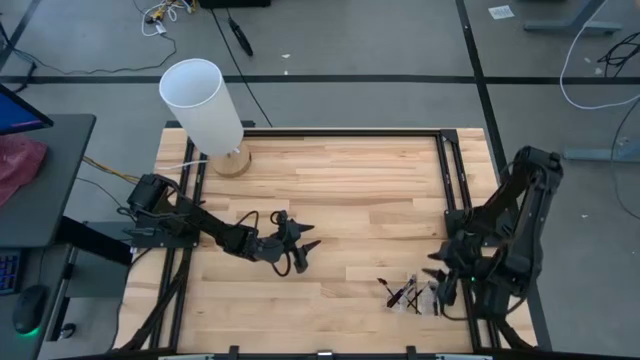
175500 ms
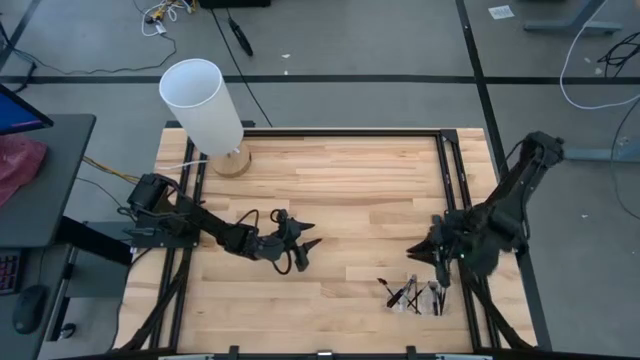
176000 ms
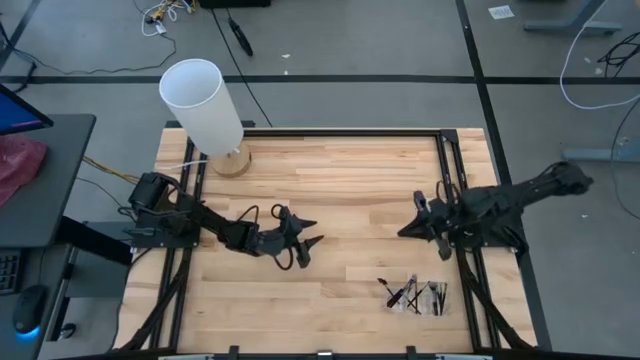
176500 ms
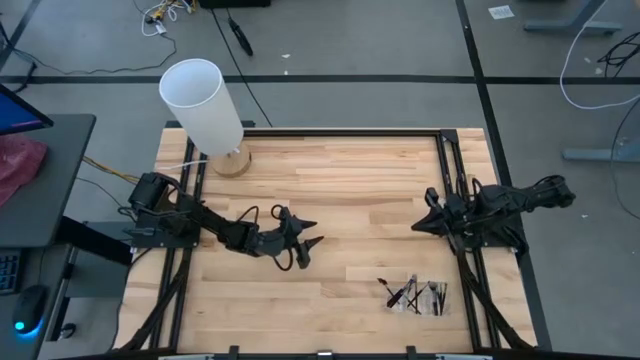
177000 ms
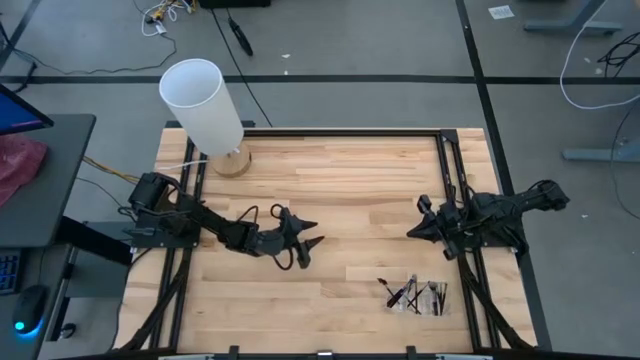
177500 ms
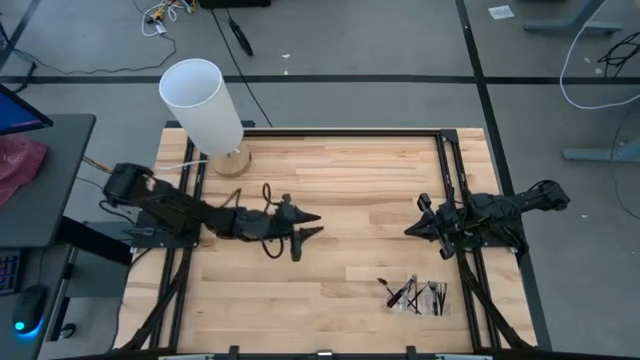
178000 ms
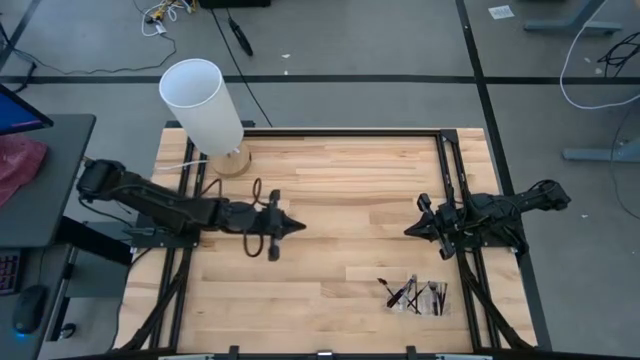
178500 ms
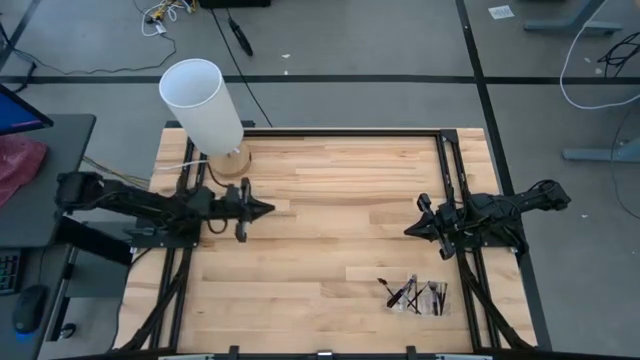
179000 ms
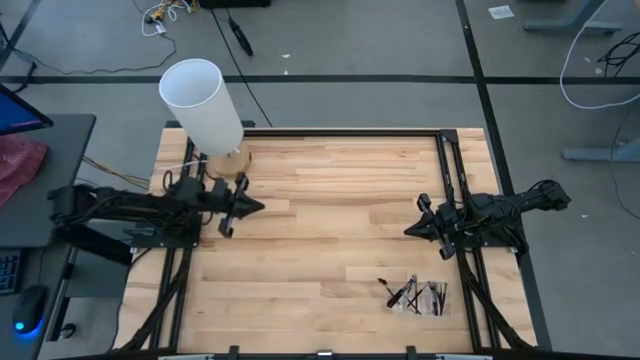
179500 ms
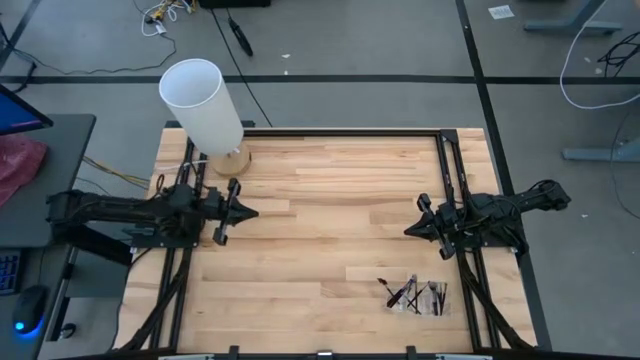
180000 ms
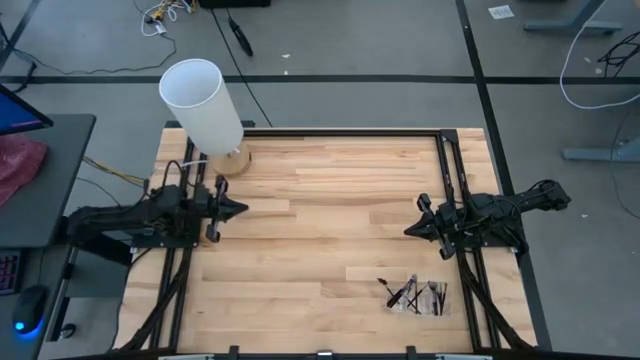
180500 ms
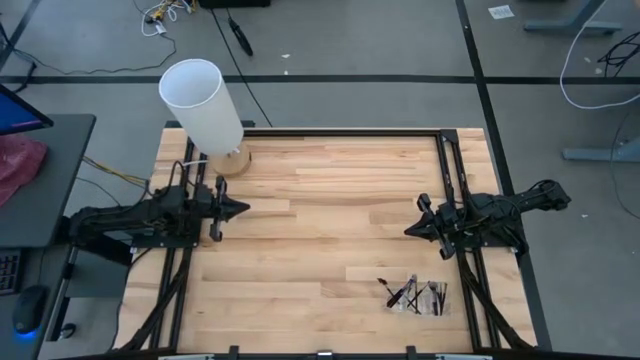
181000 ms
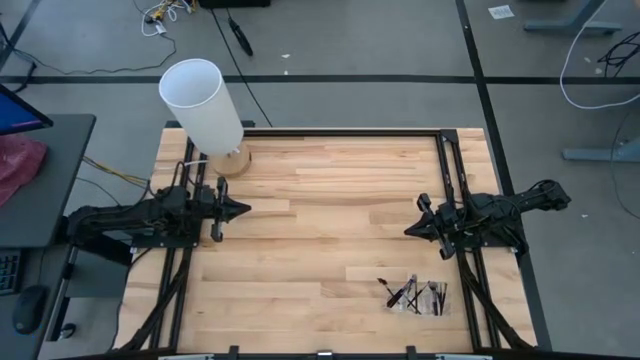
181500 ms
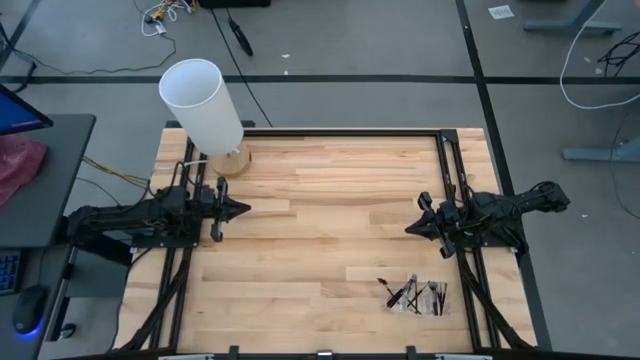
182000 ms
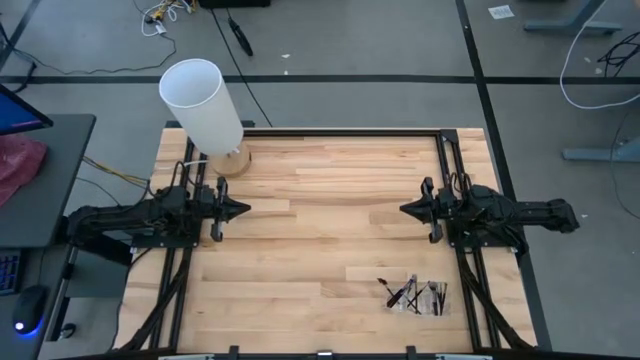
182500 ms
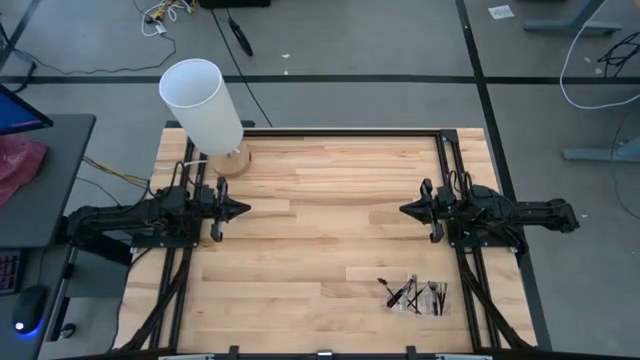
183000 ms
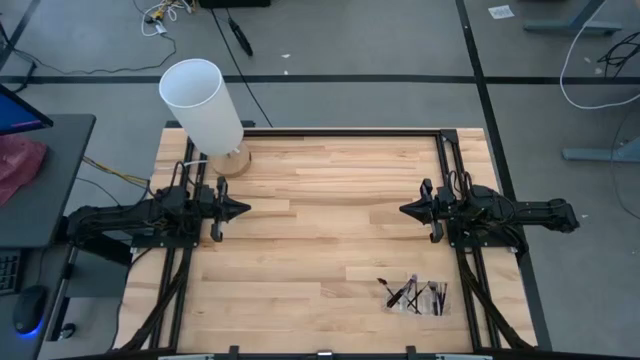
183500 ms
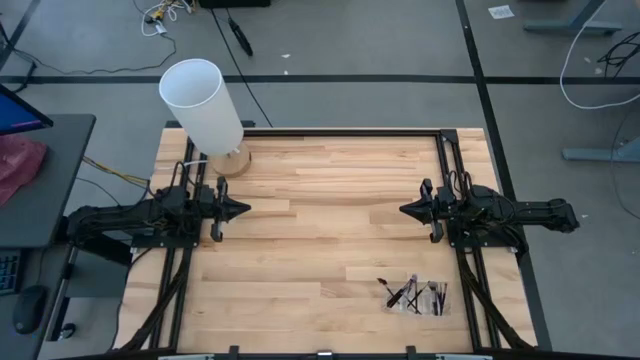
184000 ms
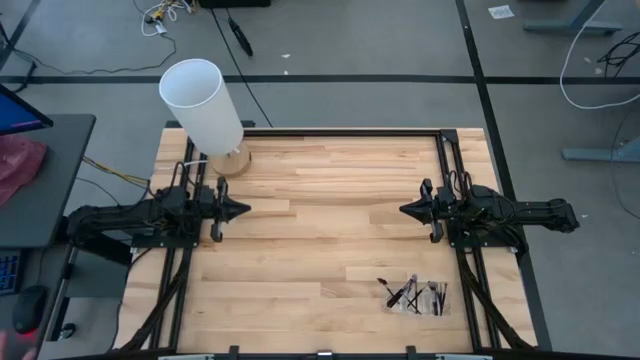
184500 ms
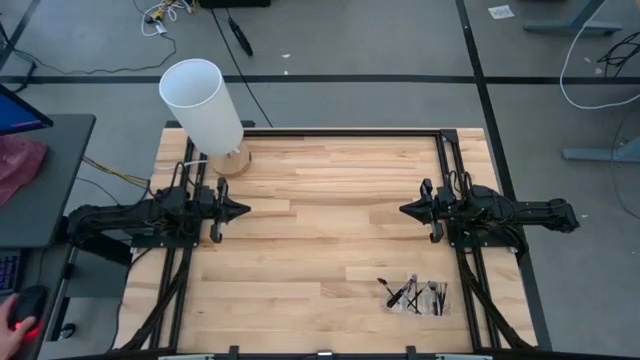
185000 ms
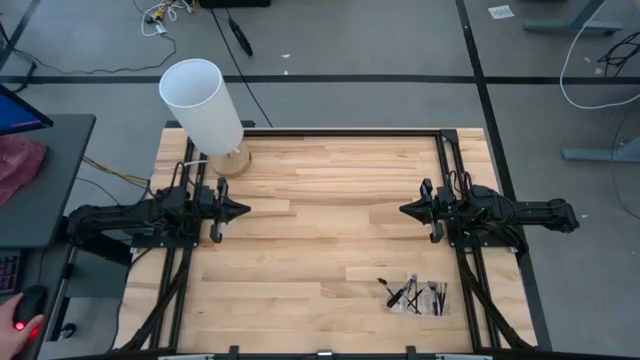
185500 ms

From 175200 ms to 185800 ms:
Task: Pick & Place Makeup Supplies
Return to Home Position

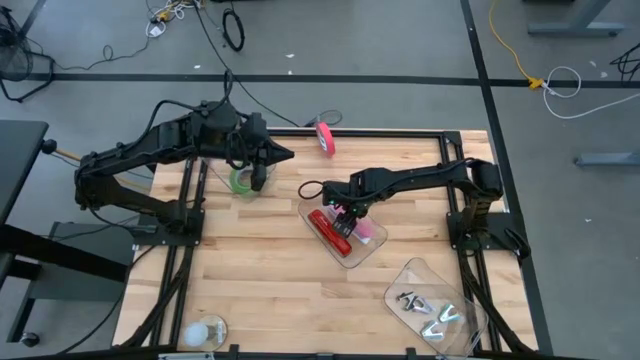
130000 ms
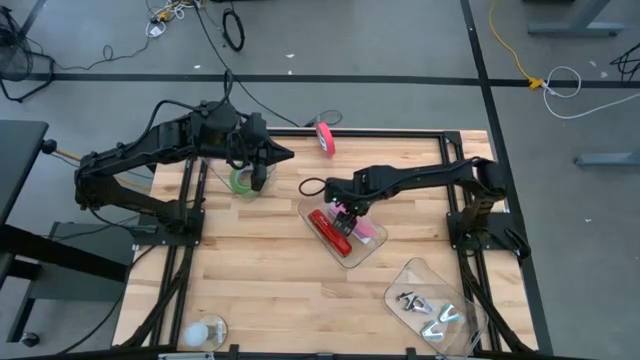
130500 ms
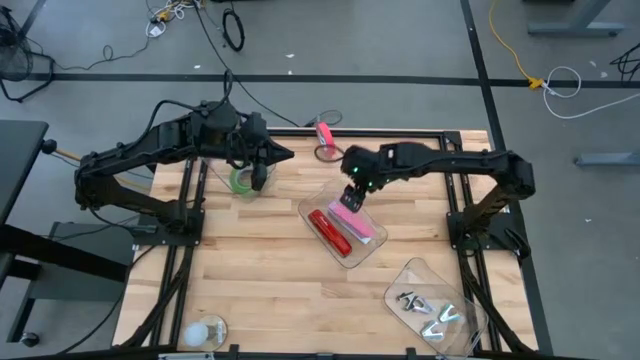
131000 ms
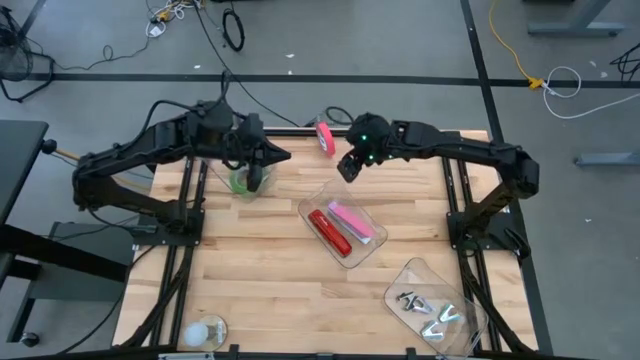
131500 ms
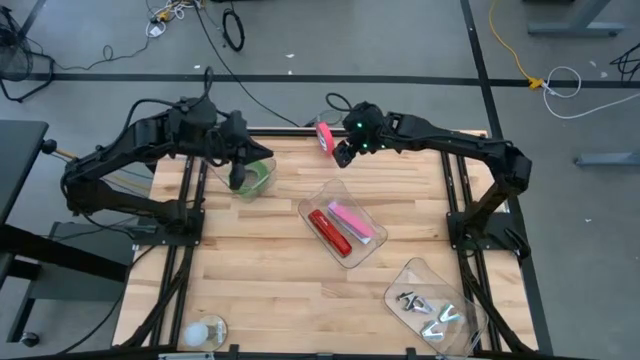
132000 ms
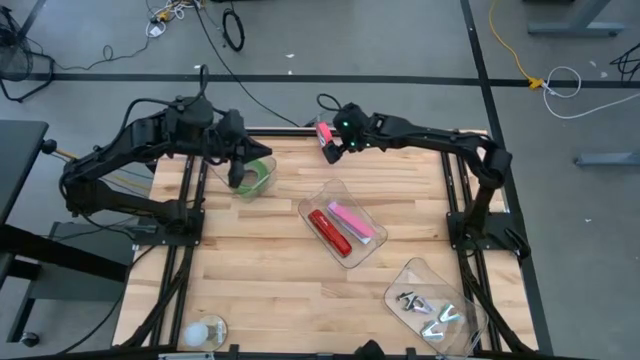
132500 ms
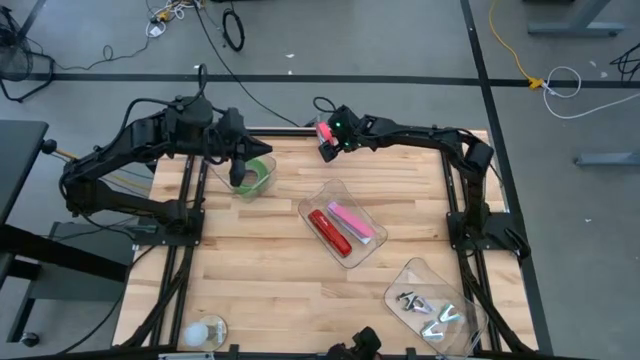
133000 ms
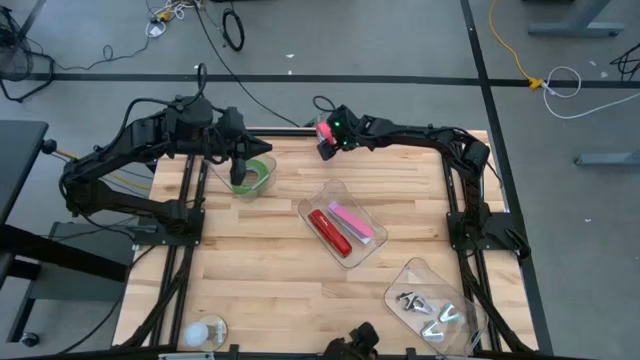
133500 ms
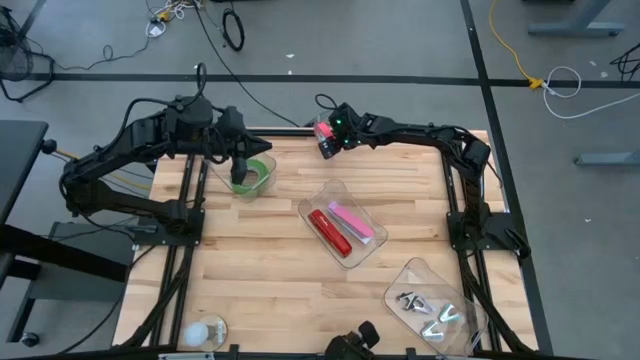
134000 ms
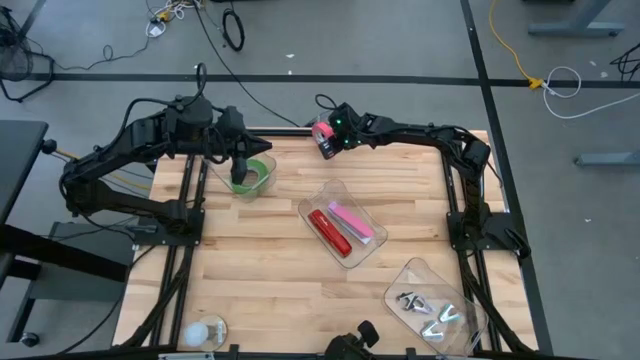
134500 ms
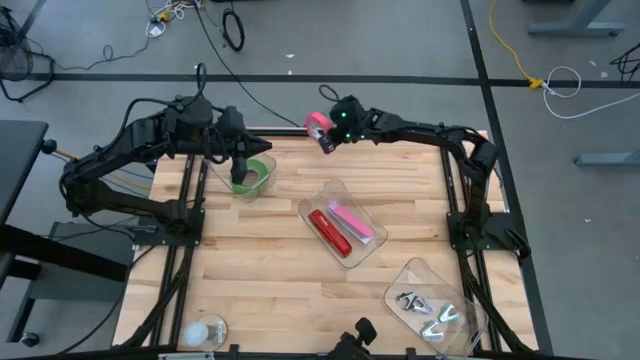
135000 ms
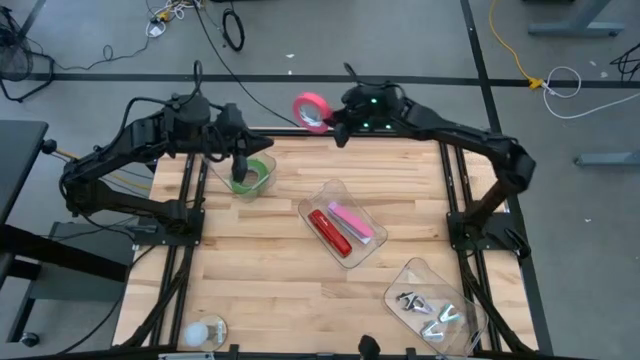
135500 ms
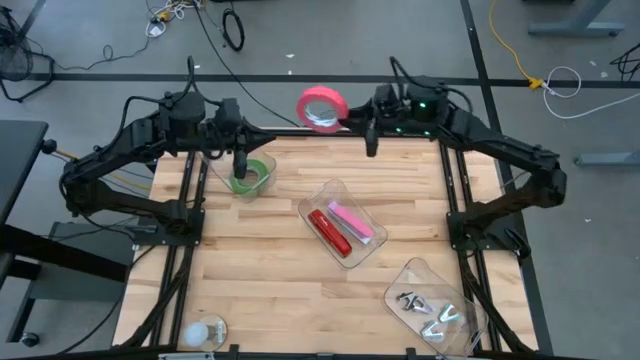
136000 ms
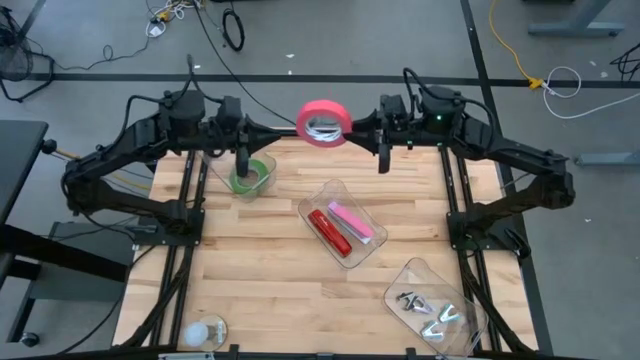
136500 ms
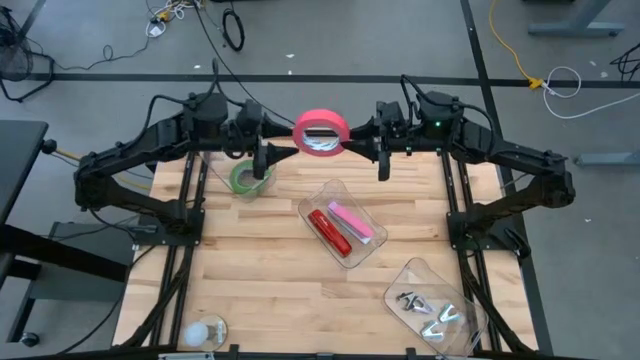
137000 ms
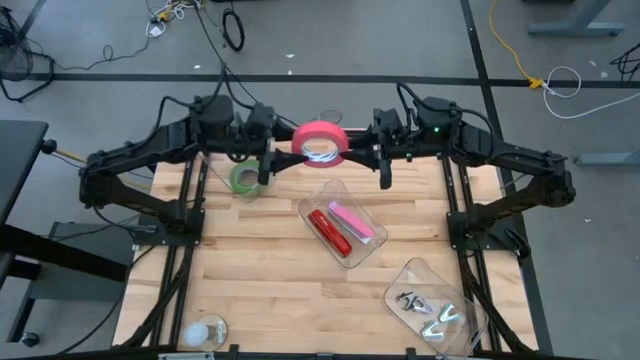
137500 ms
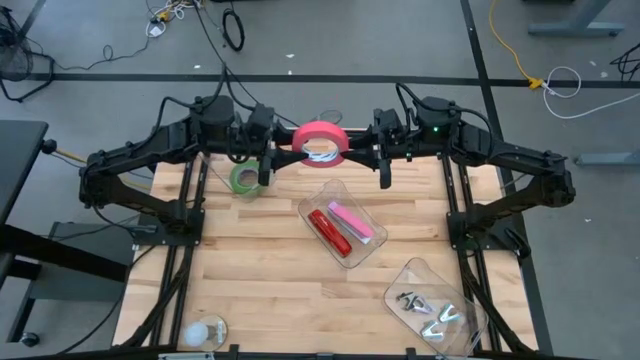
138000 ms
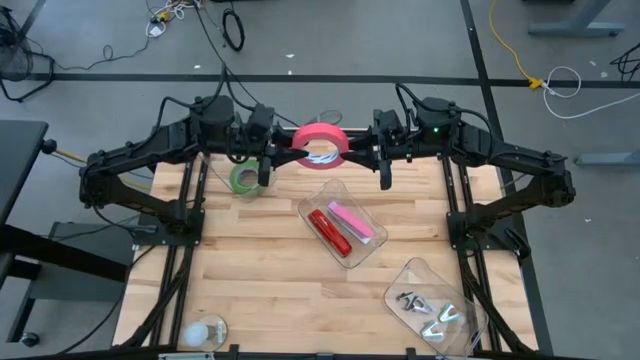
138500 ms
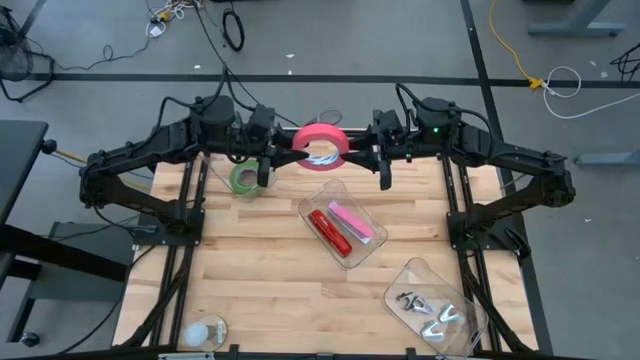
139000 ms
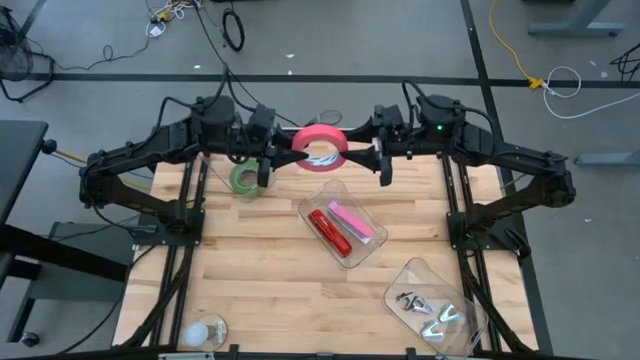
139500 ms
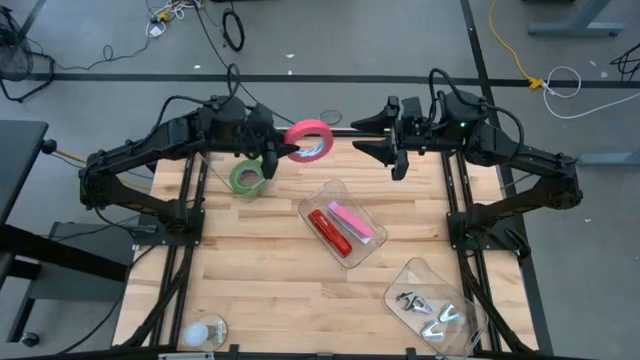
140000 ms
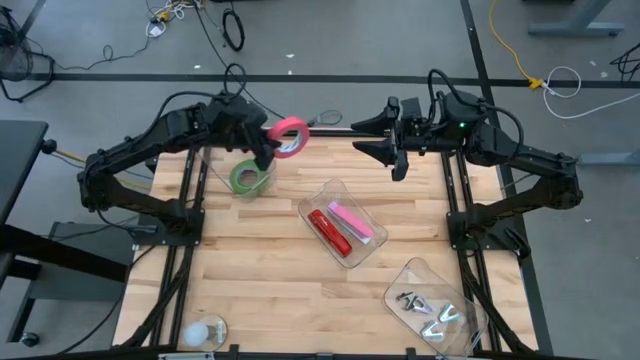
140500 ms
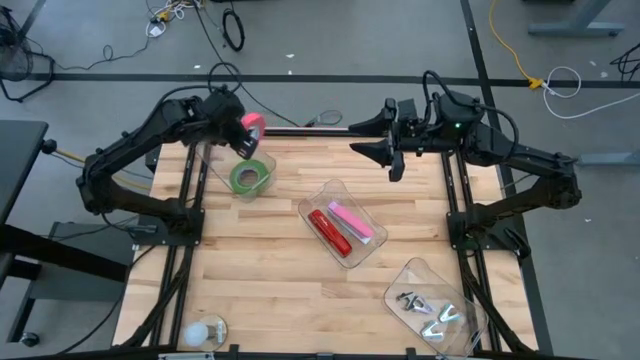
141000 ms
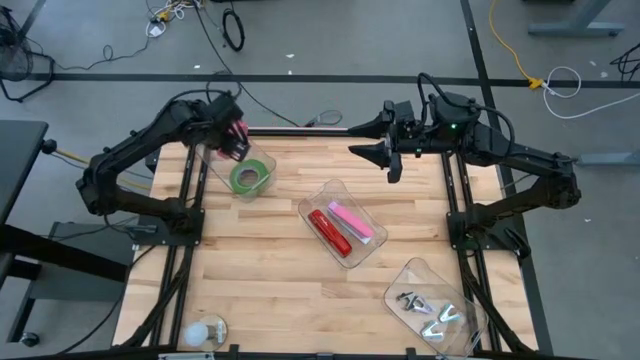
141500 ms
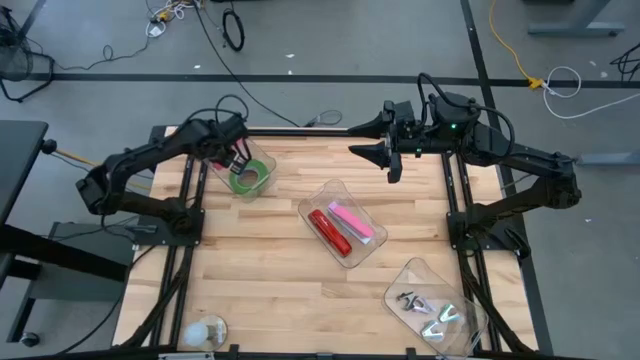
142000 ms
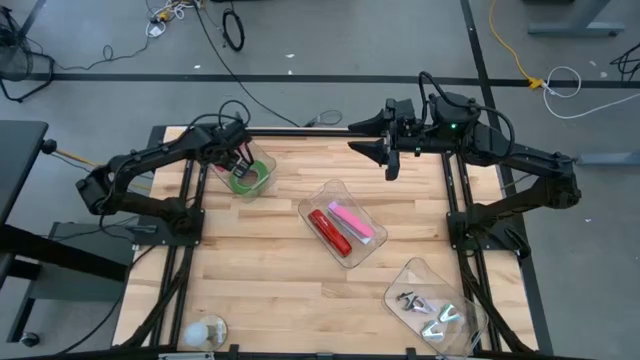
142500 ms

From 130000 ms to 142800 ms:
Task: Pick and place Stapler, Stapler remover, tape
Put the pink tape into the top transparent bin
